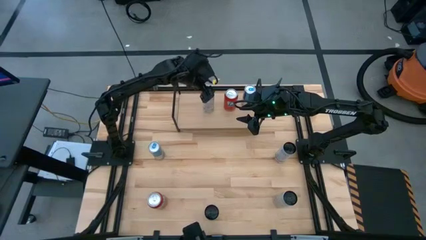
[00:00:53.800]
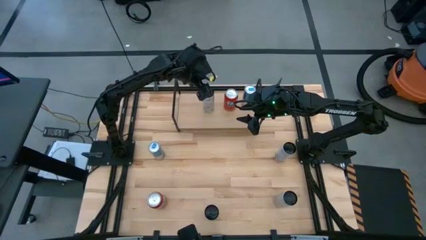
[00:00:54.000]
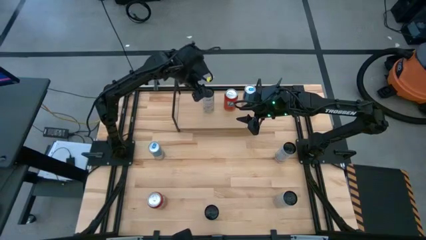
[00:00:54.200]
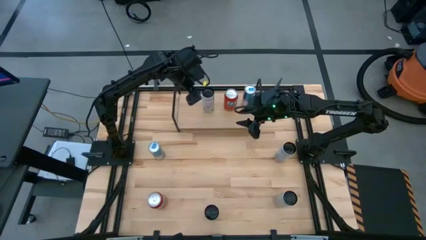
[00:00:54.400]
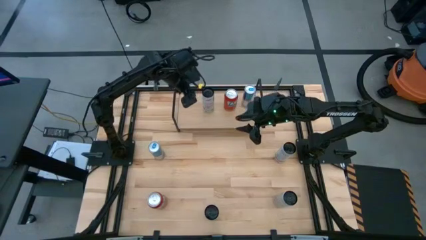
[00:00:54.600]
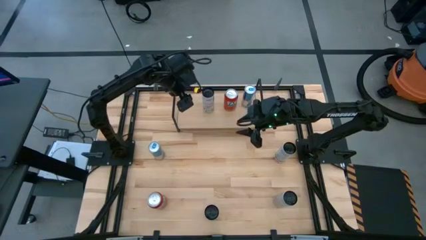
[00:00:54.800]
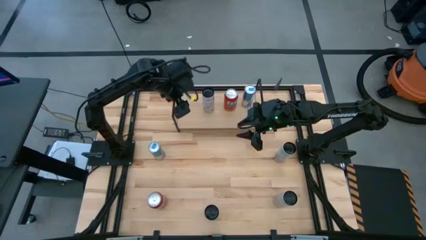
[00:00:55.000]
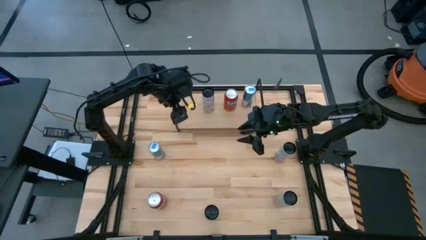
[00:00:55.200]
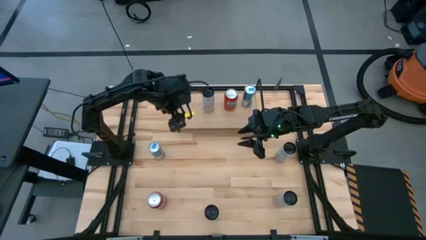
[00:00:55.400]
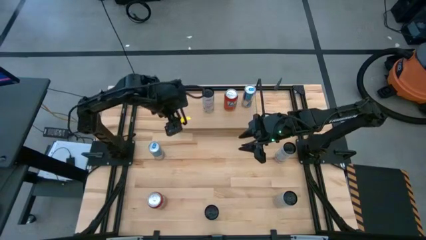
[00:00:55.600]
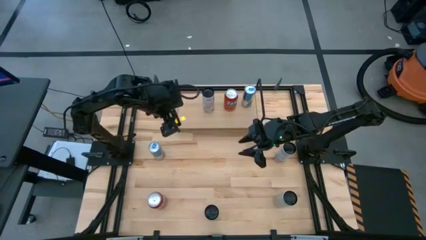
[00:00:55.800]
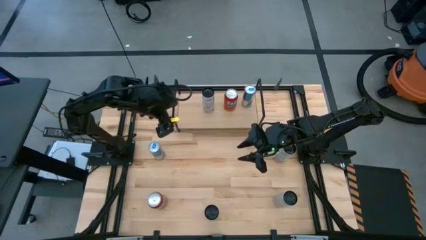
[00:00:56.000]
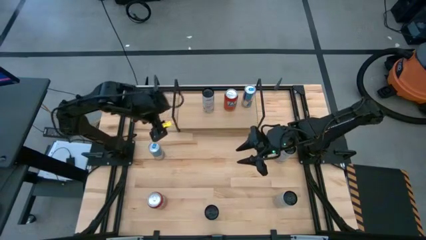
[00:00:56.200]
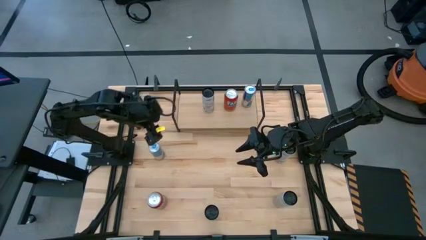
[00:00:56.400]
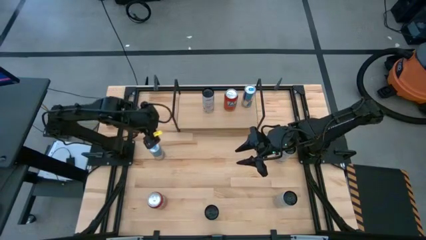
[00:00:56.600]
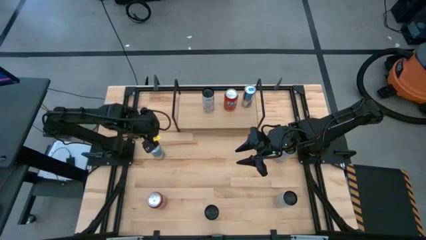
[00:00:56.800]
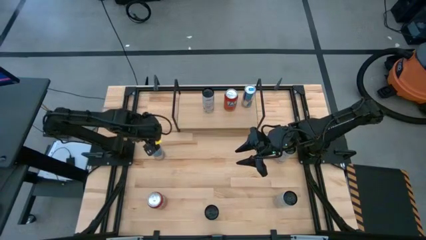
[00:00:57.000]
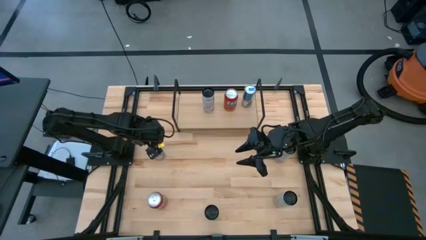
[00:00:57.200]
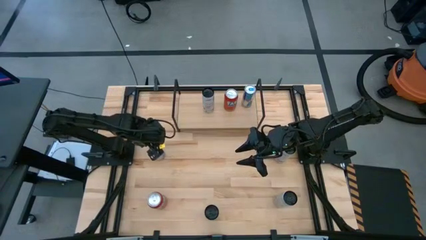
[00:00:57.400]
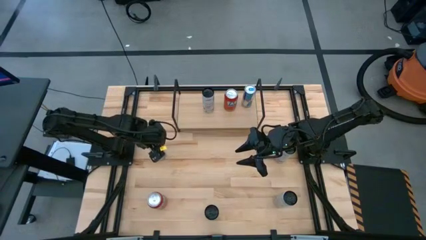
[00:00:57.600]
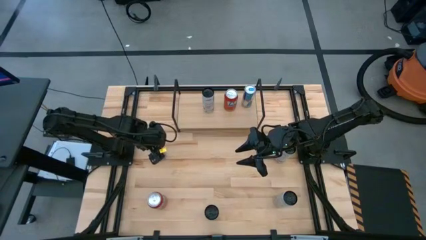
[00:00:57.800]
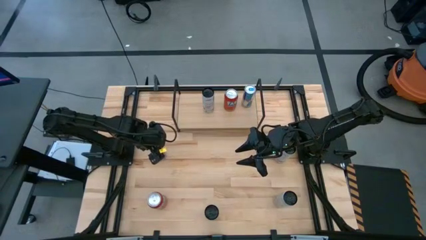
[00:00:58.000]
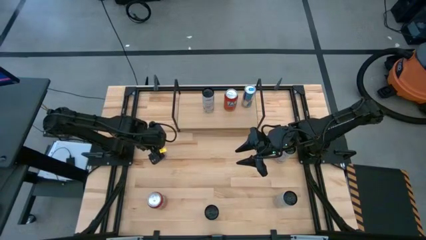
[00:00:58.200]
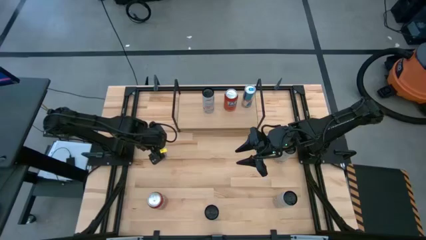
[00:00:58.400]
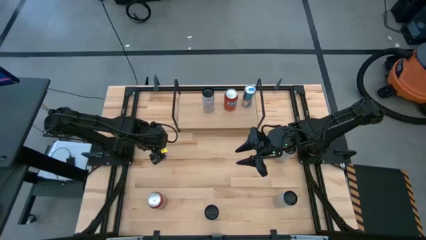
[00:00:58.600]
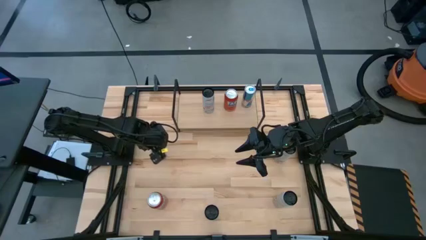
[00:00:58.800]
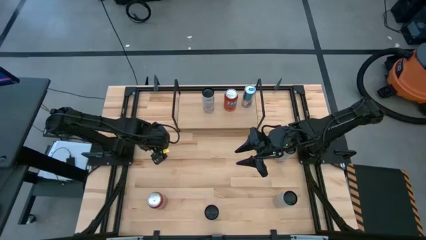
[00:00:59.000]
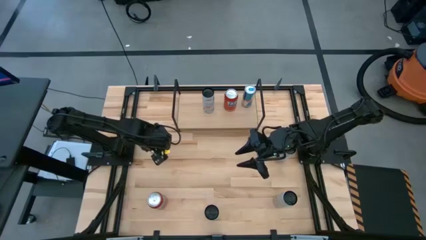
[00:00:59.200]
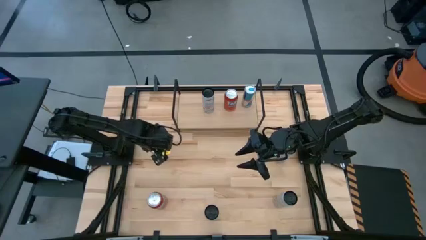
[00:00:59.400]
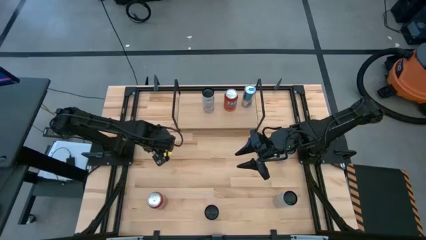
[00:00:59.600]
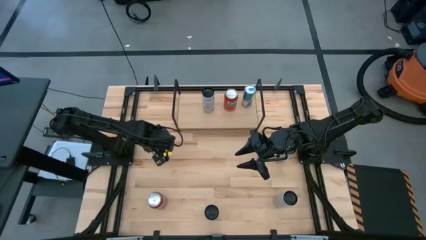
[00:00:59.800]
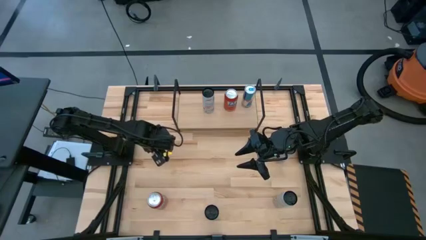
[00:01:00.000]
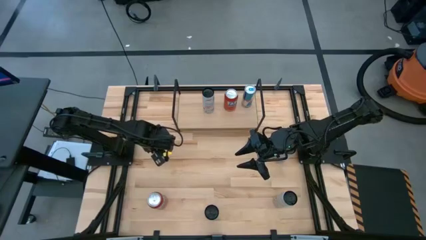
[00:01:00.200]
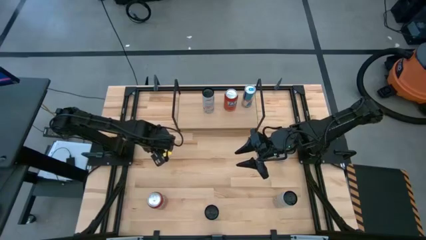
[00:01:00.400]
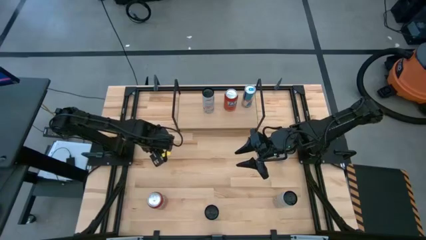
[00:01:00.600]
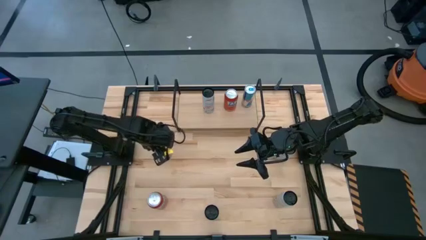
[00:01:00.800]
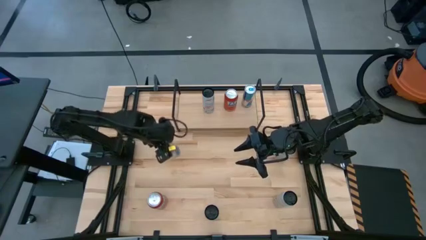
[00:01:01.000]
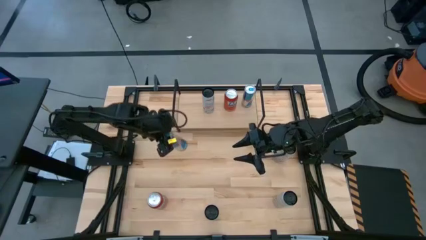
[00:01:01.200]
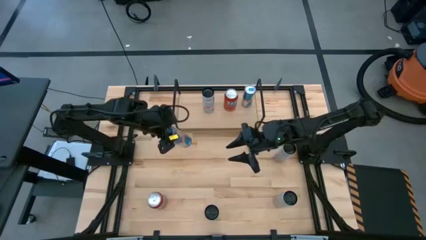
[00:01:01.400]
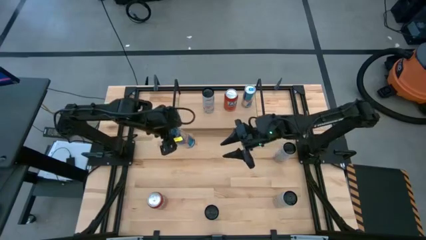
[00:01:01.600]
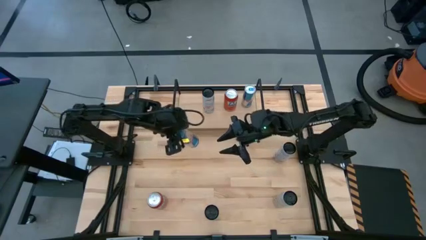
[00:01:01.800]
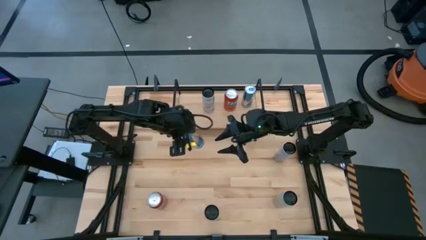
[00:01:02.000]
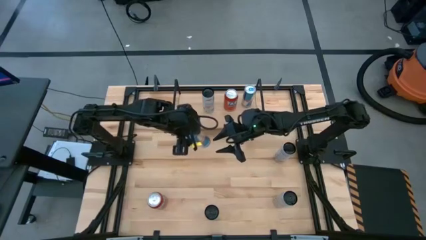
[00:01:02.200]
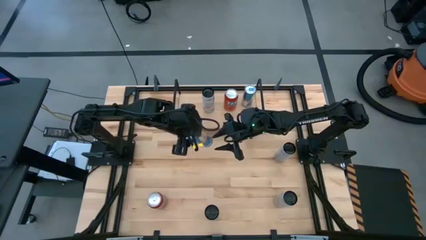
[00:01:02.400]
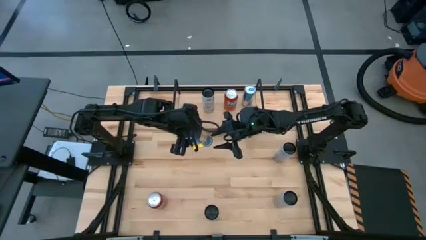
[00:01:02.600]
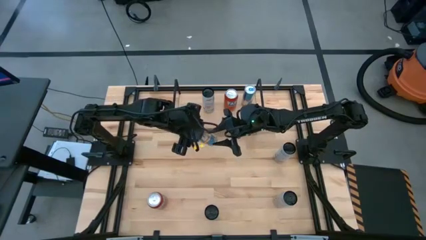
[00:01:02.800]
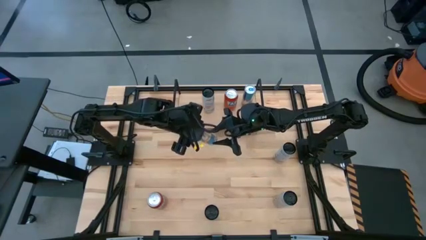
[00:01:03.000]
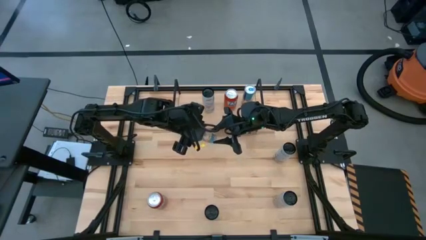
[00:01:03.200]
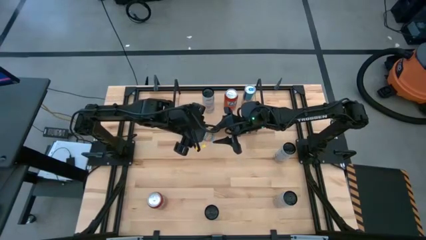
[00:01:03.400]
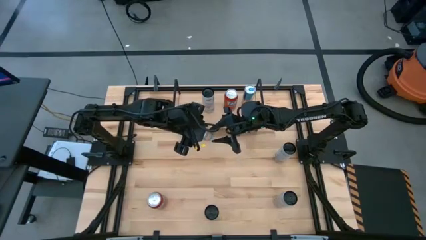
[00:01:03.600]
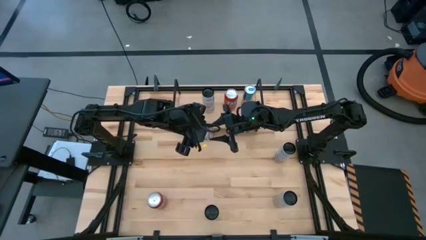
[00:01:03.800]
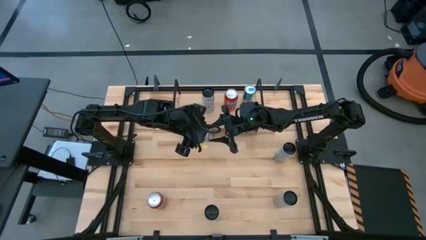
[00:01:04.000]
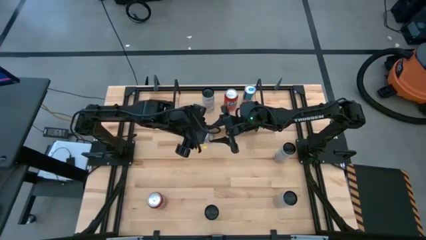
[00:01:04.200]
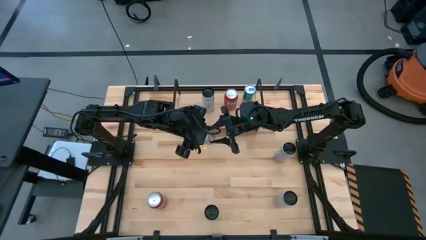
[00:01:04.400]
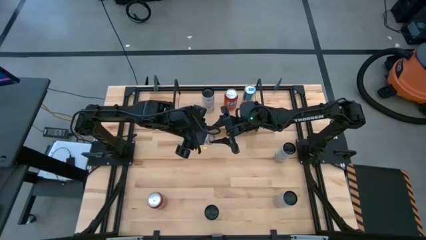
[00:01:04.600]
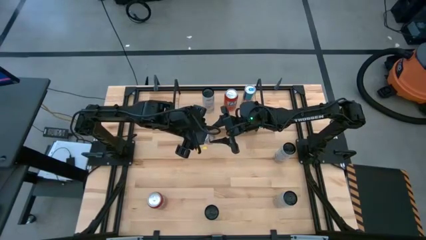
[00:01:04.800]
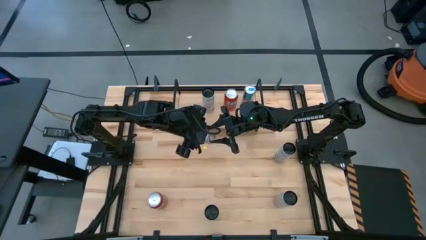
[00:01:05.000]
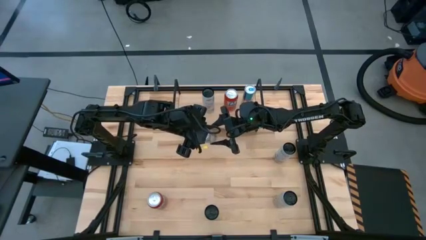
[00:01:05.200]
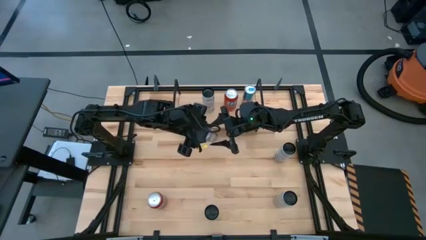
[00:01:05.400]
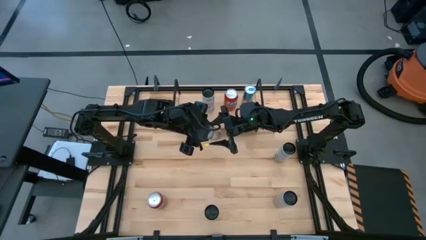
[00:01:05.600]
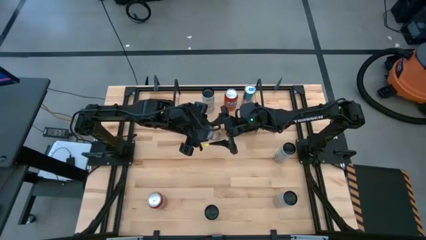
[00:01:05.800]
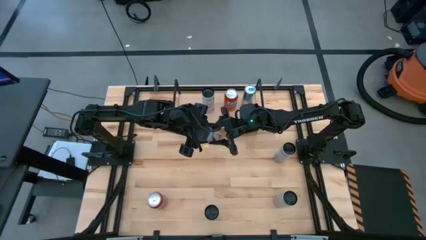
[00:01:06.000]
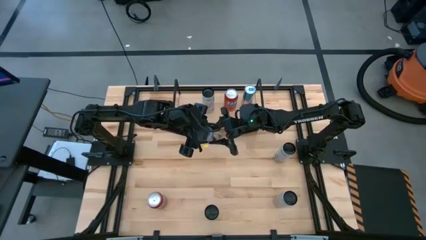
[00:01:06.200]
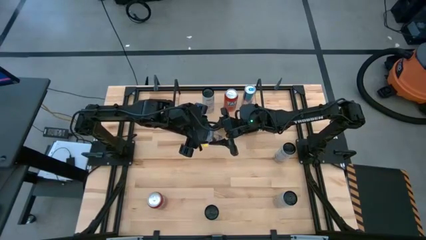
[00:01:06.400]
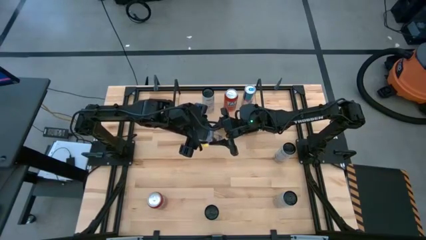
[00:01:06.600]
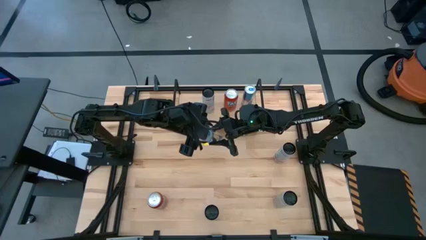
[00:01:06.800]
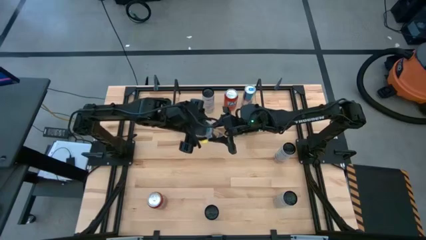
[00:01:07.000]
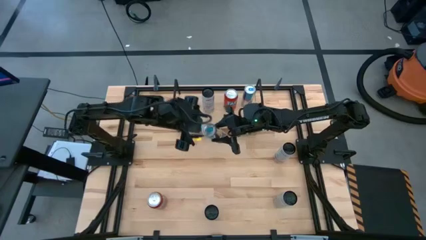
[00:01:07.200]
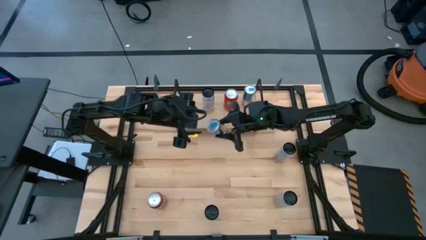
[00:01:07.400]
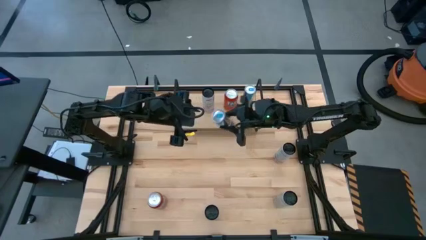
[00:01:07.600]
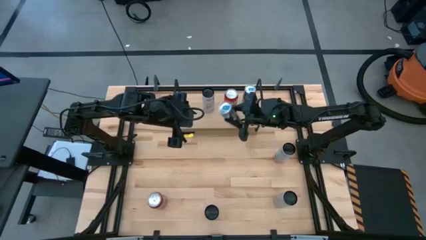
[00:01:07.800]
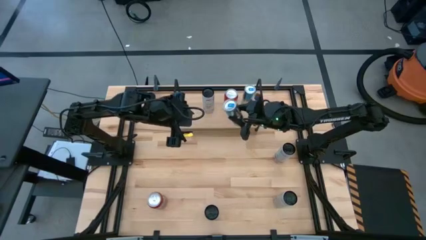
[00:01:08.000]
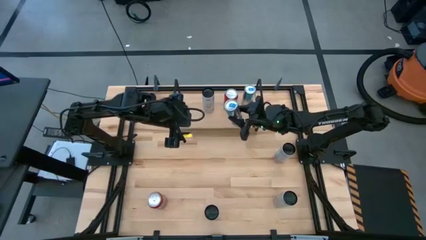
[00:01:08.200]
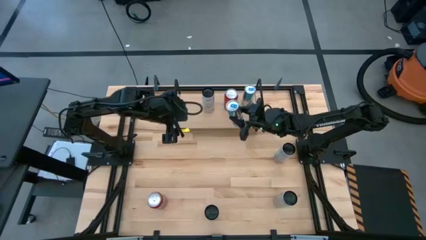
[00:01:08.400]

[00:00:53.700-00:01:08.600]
Task: Place canned beverage on shelf
Put the blue soda can aligned with the other blue soda can on the shelf
